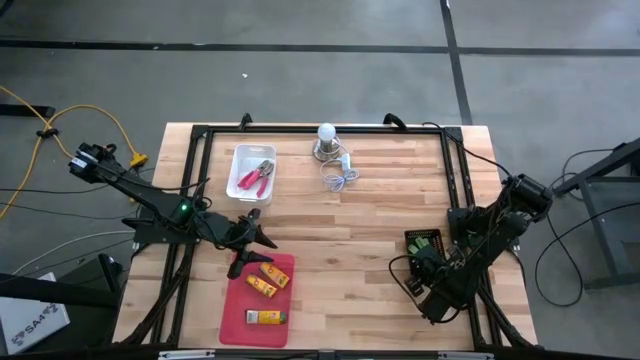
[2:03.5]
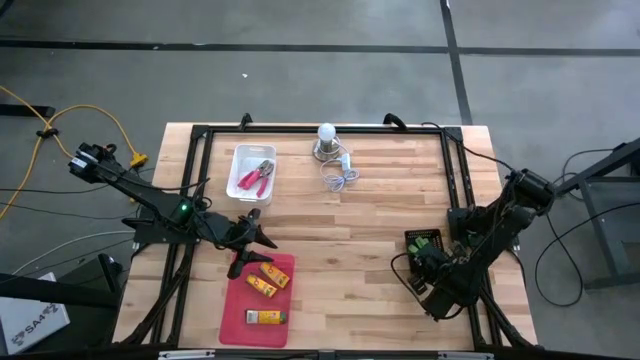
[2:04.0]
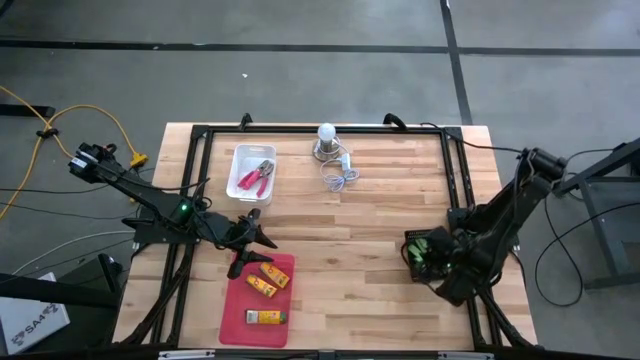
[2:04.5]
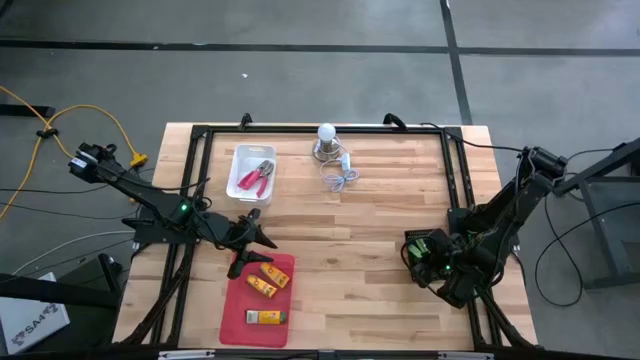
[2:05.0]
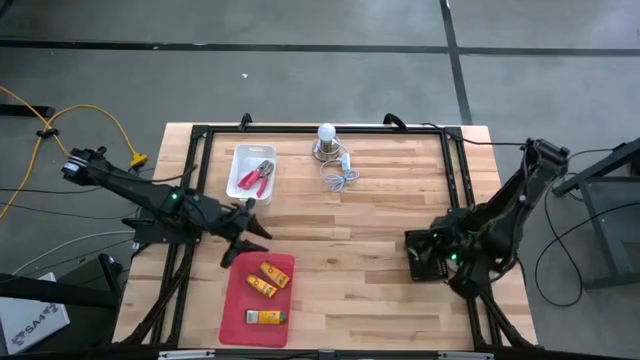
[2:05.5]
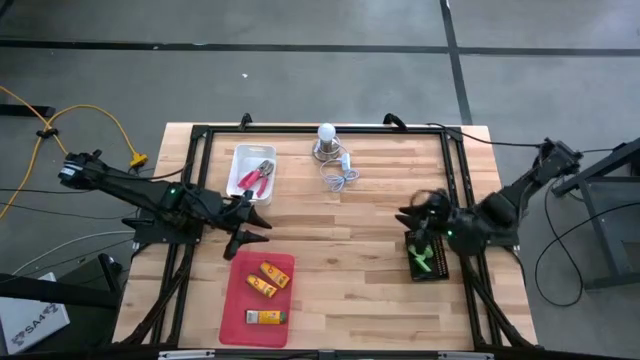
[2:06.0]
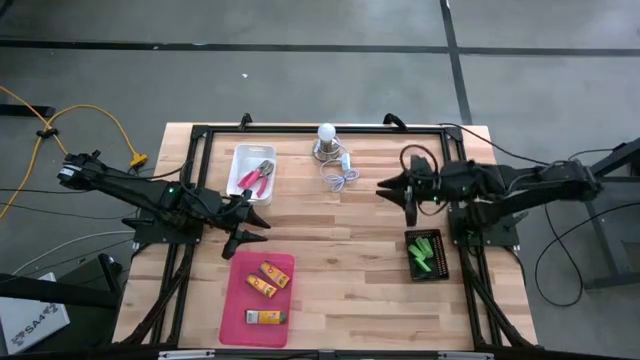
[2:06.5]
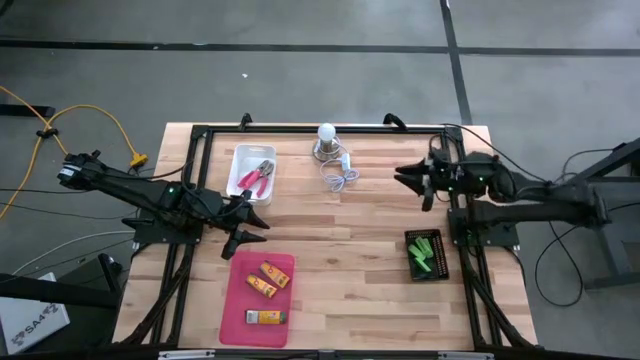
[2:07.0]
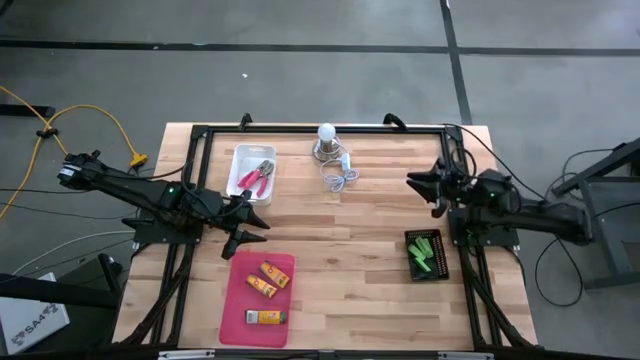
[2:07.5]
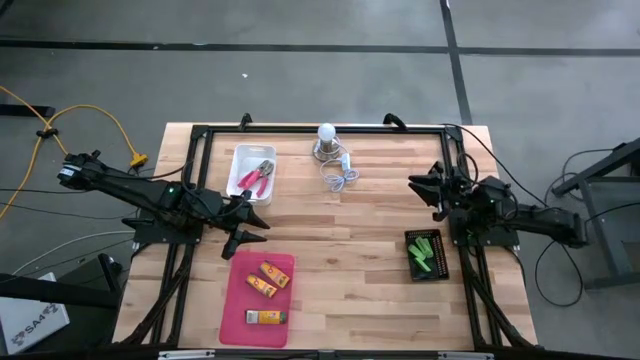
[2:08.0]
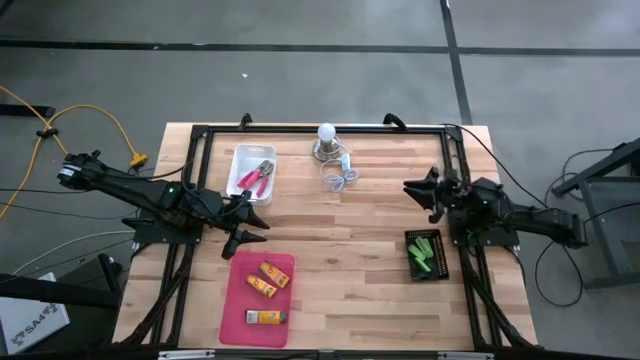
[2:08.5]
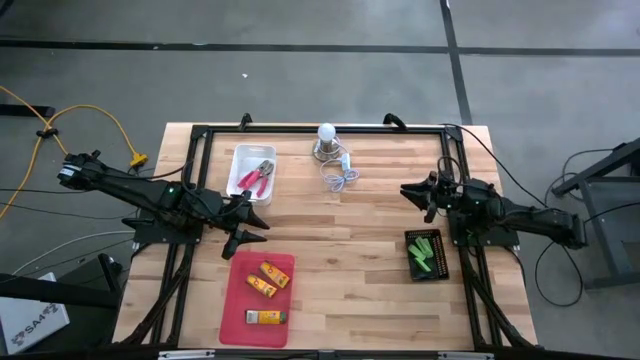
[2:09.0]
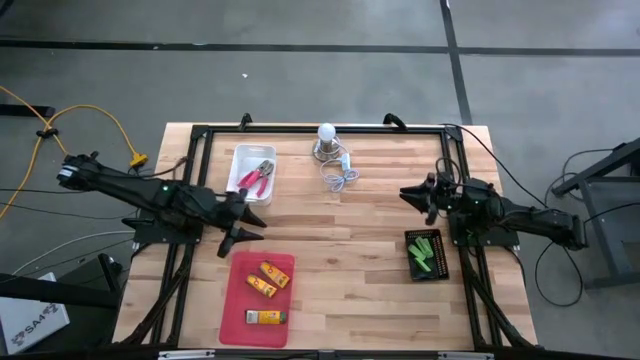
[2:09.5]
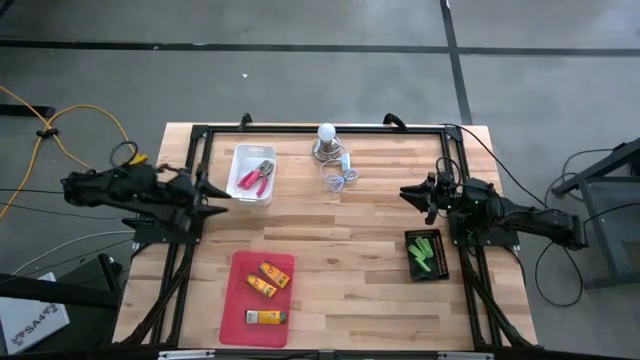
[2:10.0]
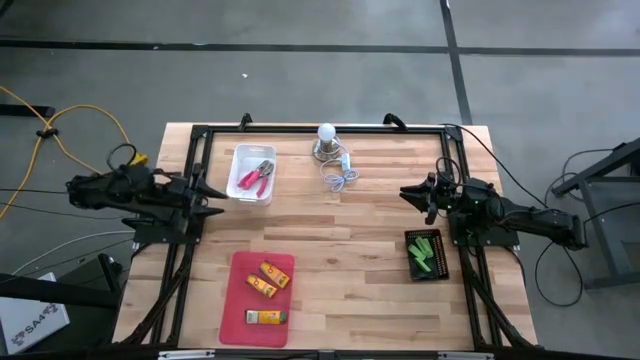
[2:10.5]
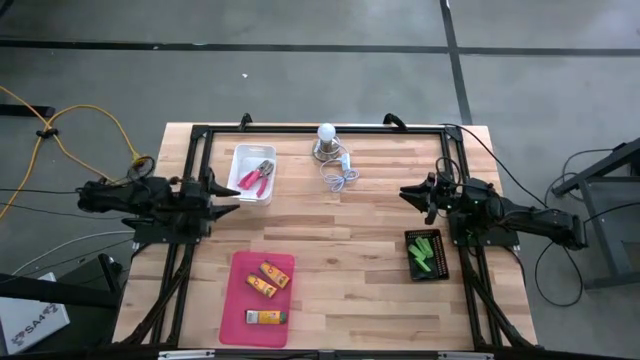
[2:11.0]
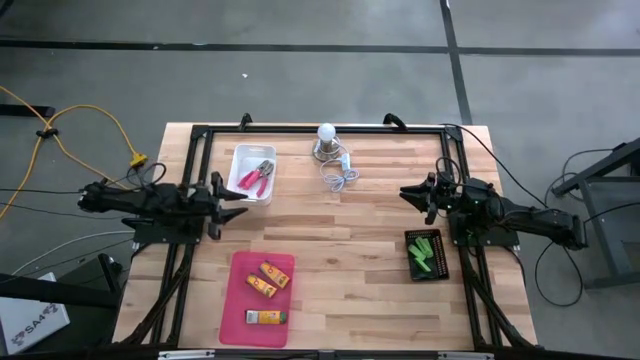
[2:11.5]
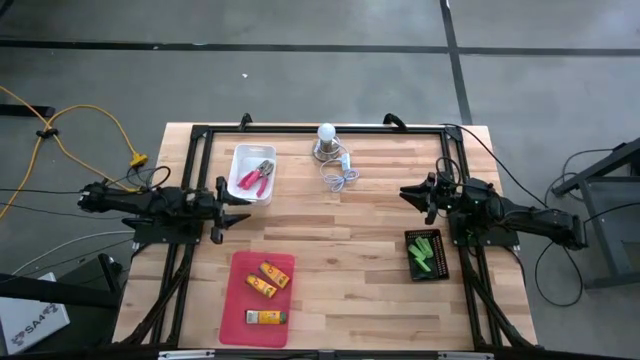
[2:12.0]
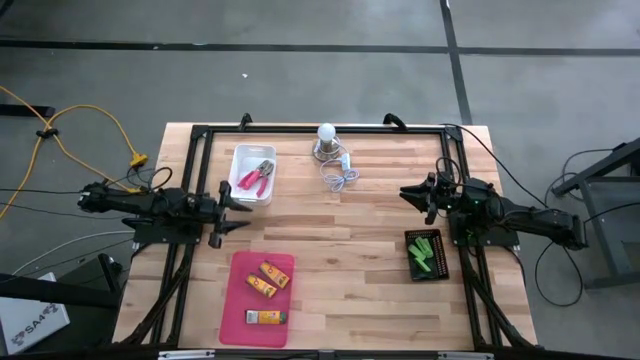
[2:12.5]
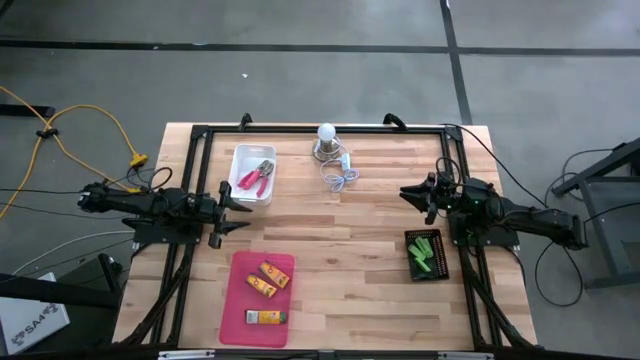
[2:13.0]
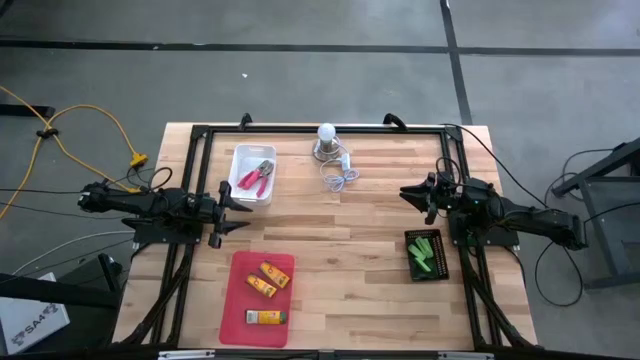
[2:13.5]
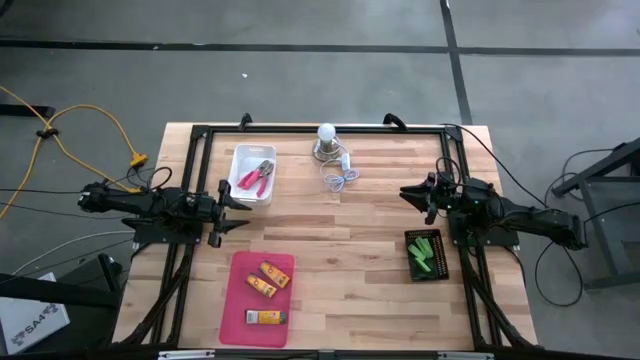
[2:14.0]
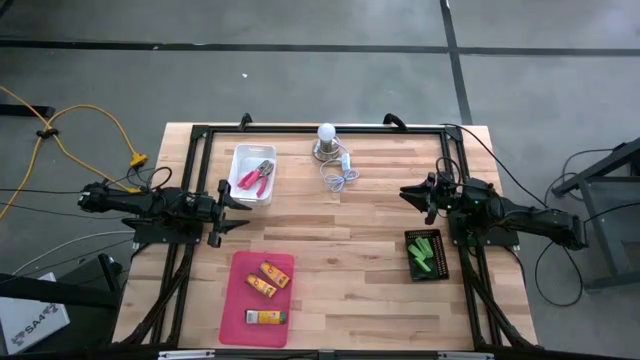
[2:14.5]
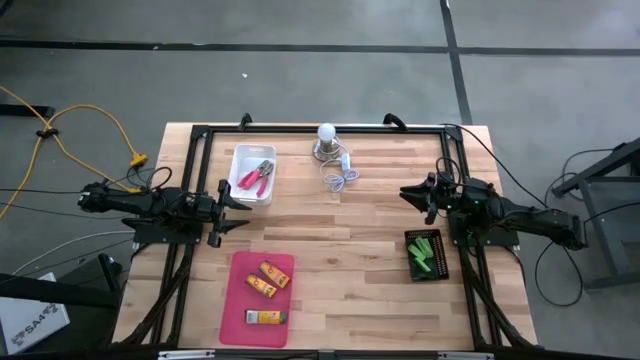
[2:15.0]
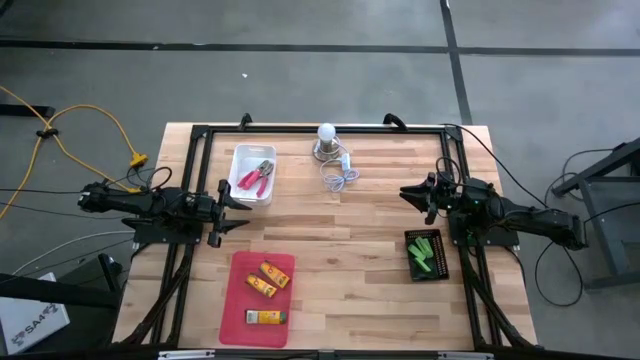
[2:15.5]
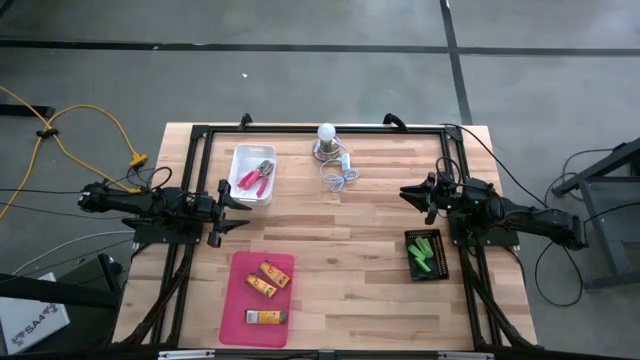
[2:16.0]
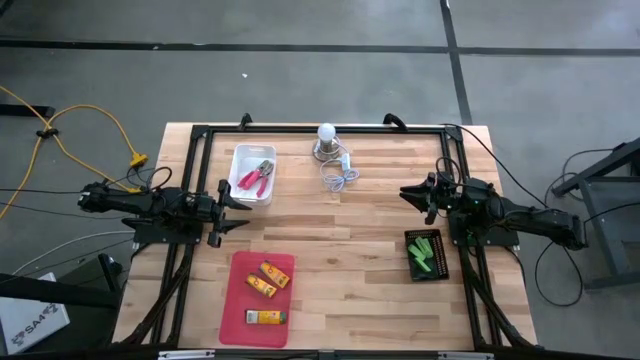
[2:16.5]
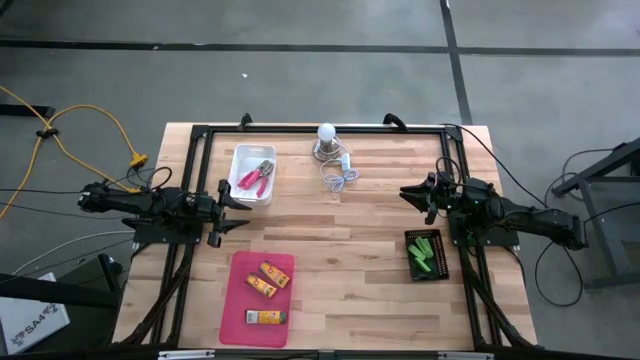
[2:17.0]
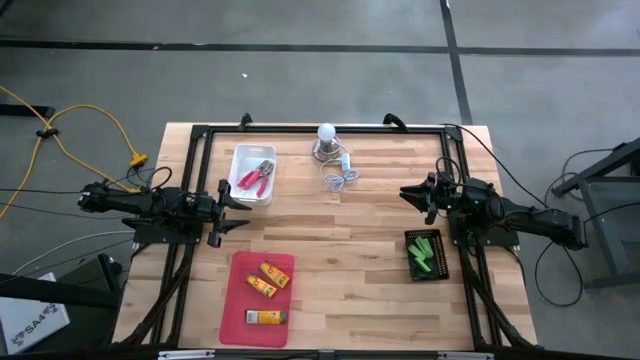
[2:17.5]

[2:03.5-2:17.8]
Task: Pick & Place School Supplies
Return to Home Position

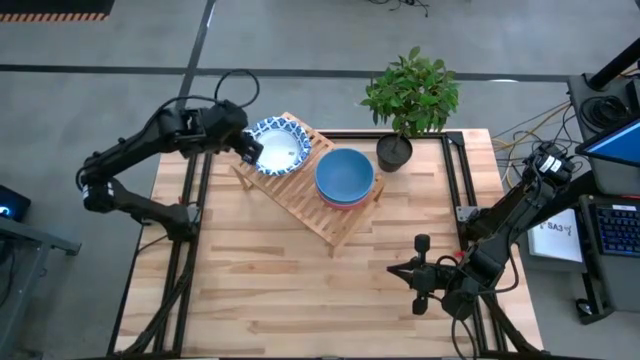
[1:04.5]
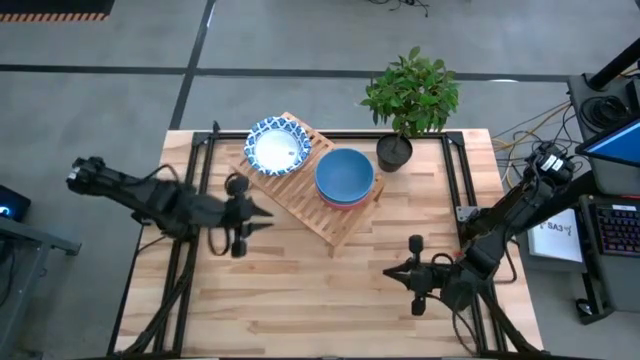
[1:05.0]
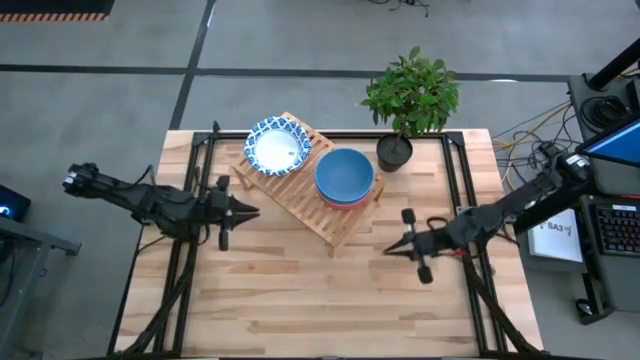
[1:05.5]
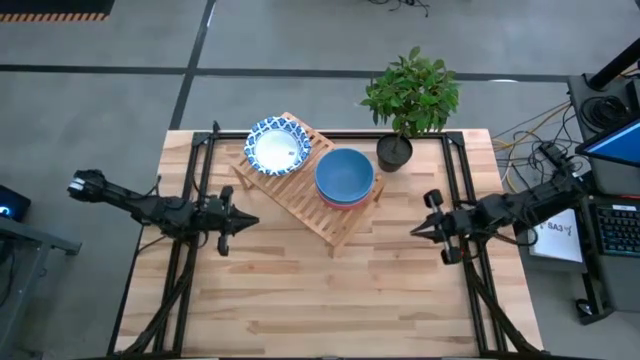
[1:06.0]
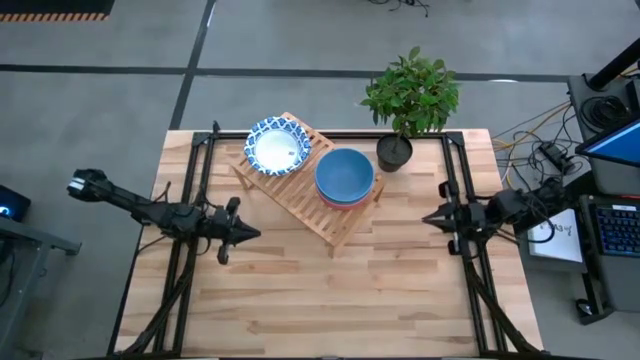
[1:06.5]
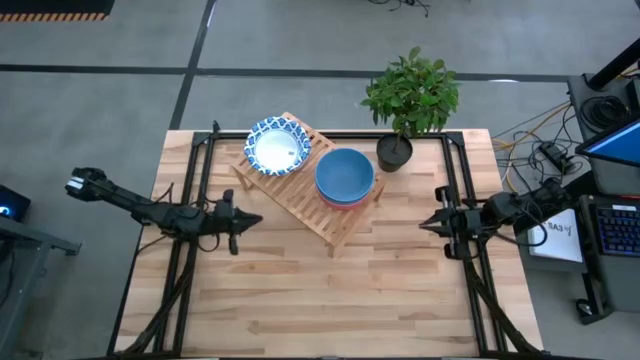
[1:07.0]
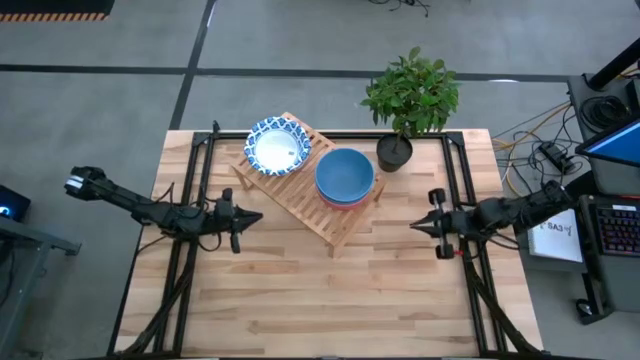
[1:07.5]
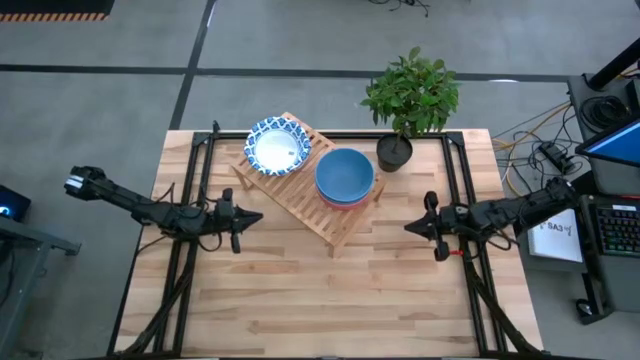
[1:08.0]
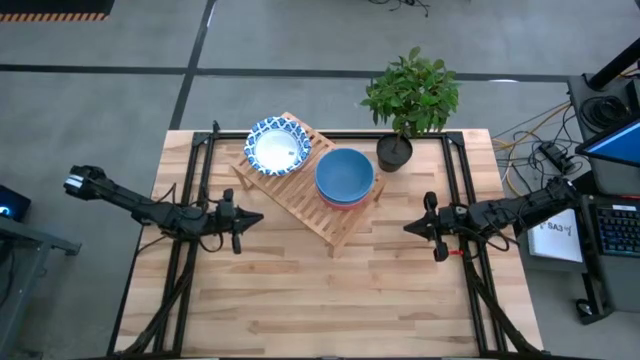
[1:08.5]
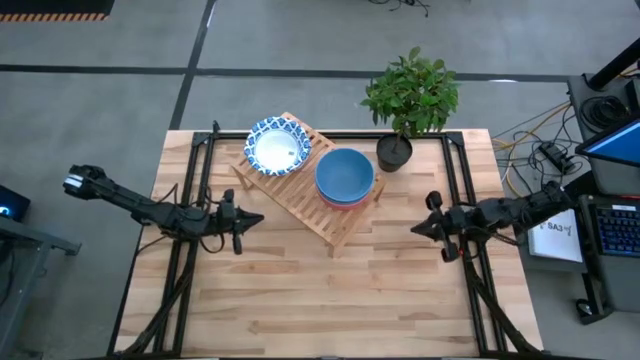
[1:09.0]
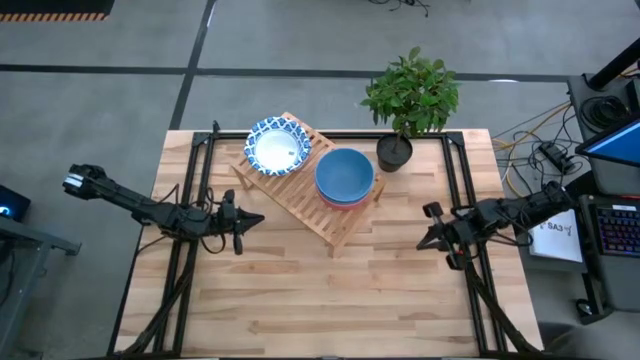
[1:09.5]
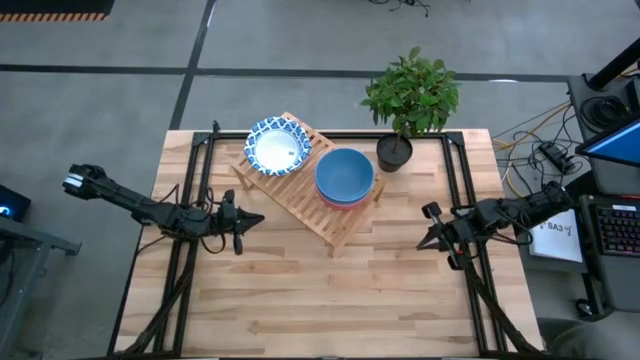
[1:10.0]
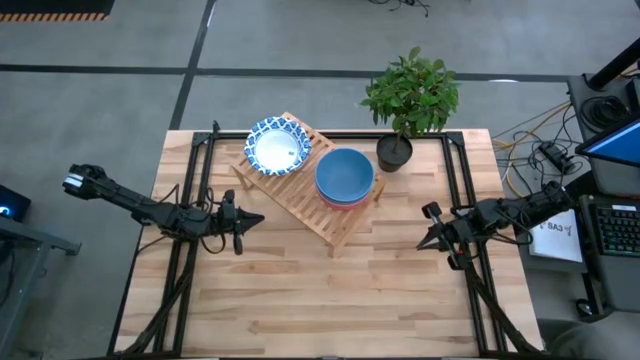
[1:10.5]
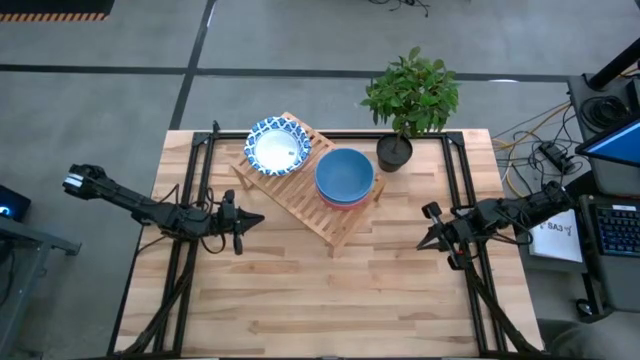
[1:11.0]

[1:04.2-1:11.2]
Task: Place and stack bowls onto a shelf
Return to Home Position

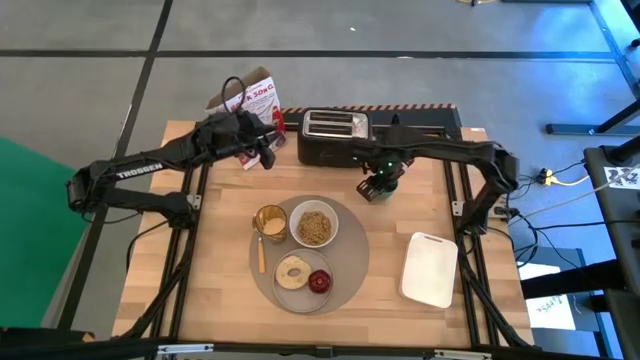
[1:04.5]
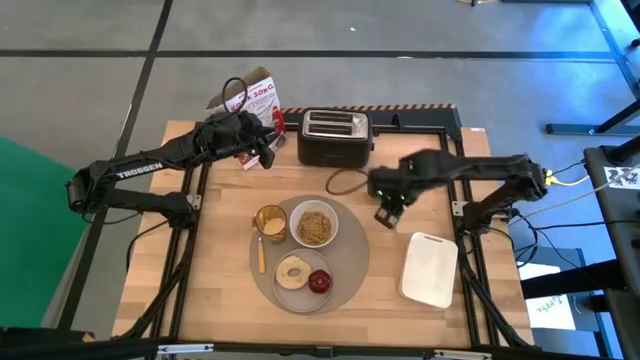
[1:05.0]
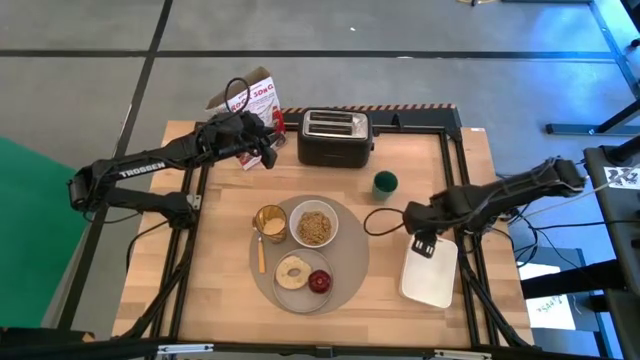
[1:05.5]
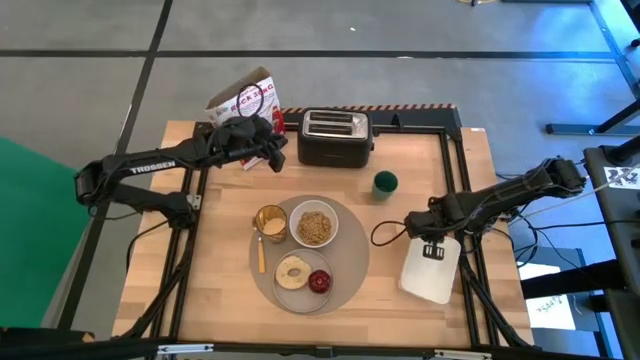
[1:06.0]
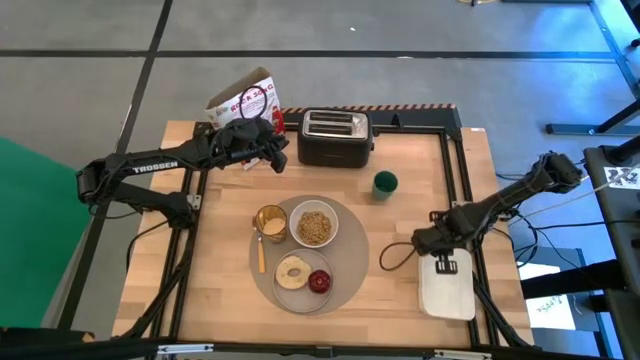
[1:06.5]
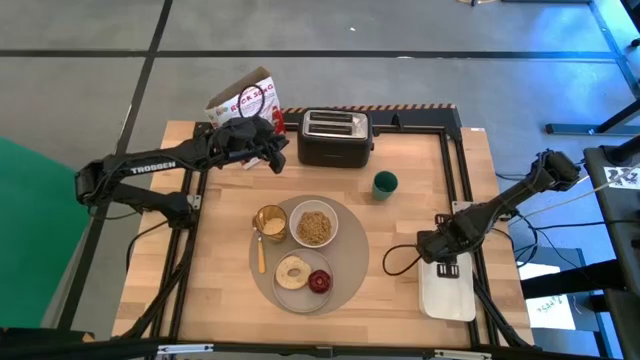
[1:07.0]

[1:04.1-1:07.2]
Task: Arrange a breakfast setting
Adjust the white bin
